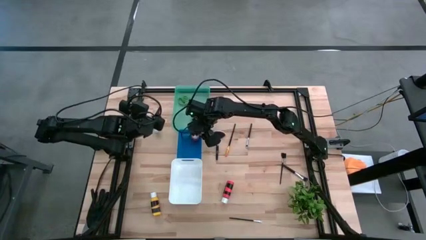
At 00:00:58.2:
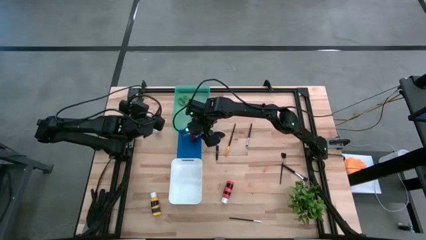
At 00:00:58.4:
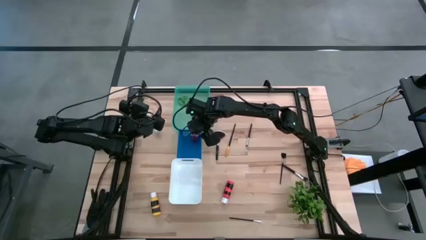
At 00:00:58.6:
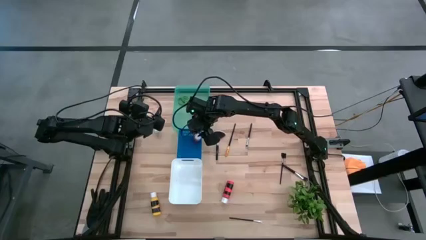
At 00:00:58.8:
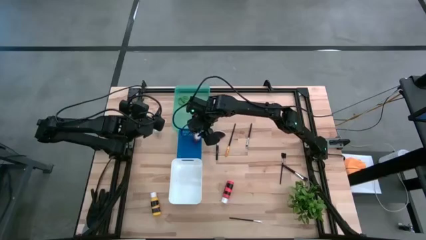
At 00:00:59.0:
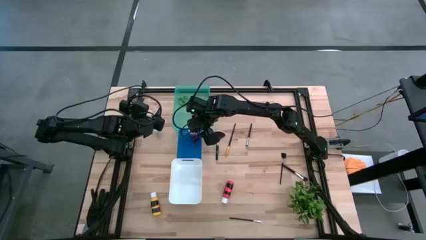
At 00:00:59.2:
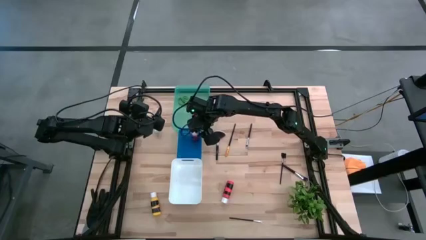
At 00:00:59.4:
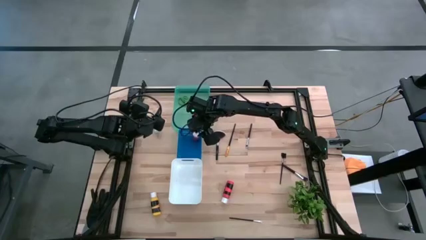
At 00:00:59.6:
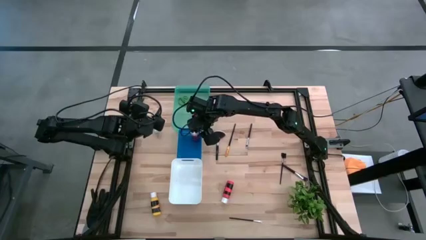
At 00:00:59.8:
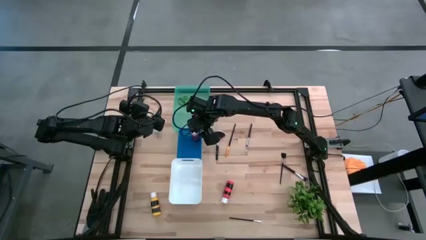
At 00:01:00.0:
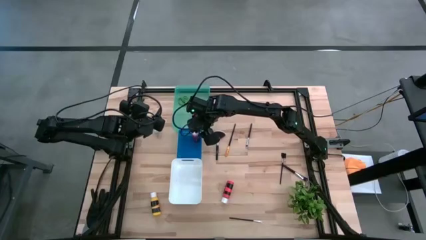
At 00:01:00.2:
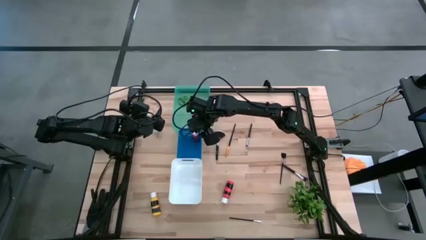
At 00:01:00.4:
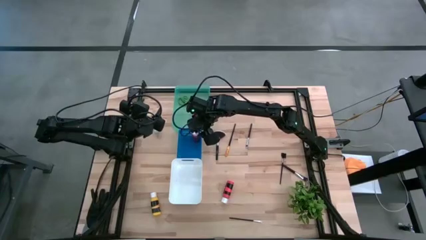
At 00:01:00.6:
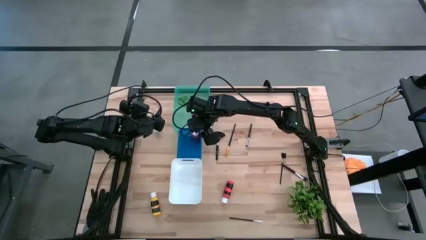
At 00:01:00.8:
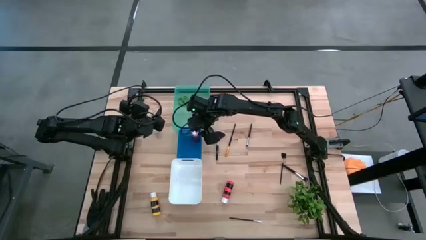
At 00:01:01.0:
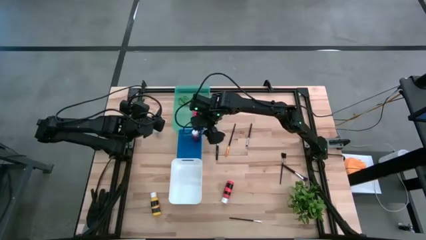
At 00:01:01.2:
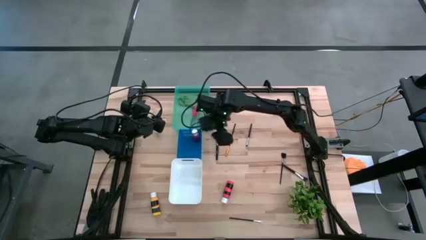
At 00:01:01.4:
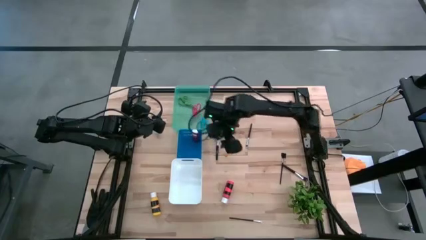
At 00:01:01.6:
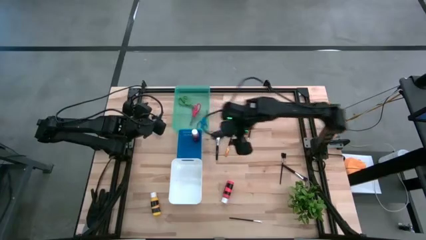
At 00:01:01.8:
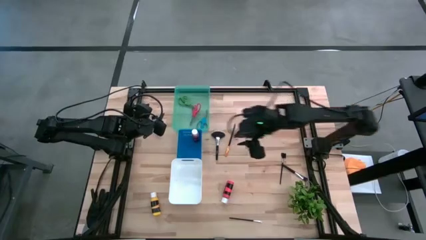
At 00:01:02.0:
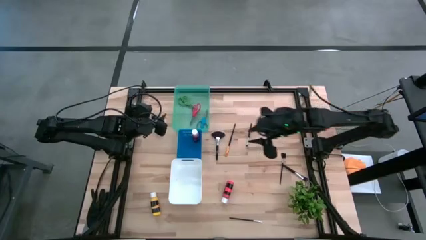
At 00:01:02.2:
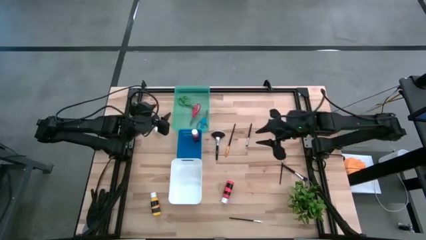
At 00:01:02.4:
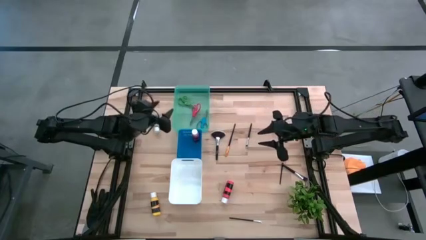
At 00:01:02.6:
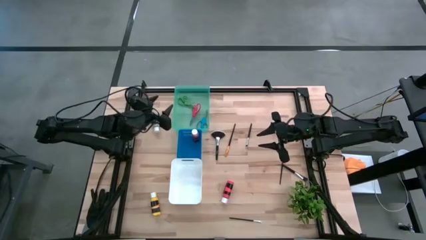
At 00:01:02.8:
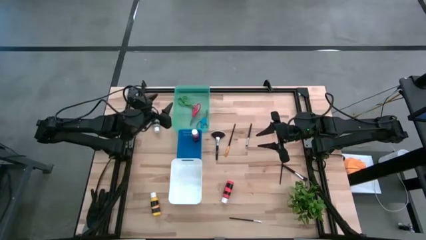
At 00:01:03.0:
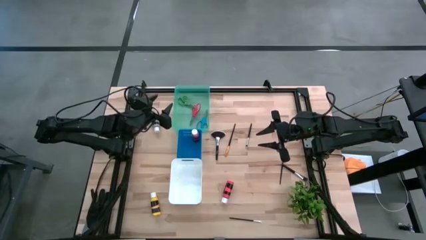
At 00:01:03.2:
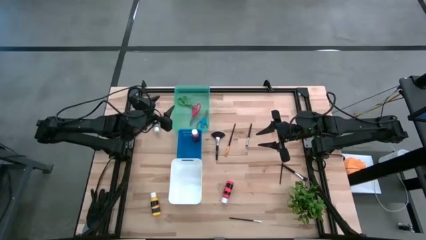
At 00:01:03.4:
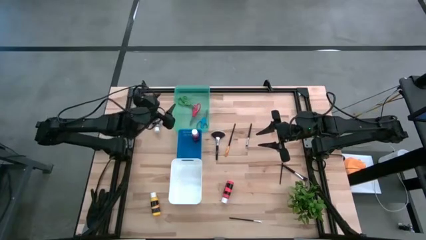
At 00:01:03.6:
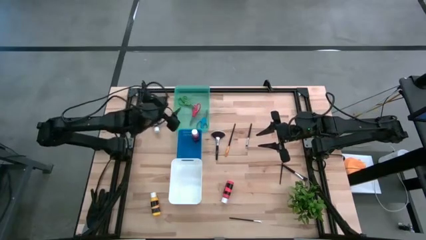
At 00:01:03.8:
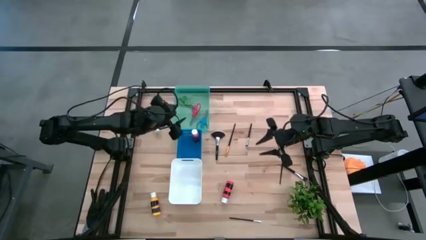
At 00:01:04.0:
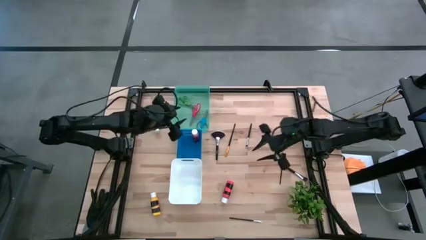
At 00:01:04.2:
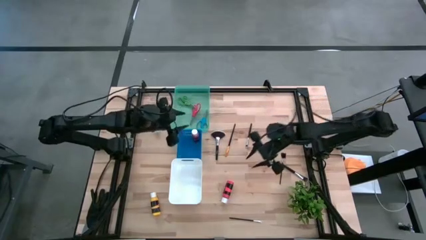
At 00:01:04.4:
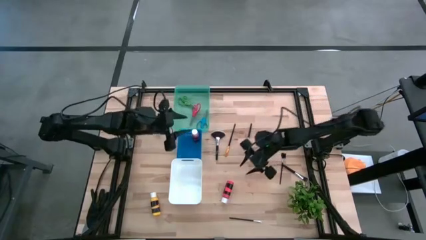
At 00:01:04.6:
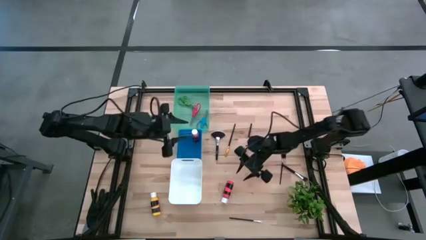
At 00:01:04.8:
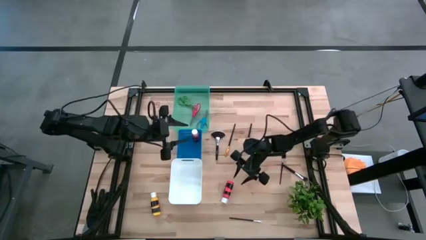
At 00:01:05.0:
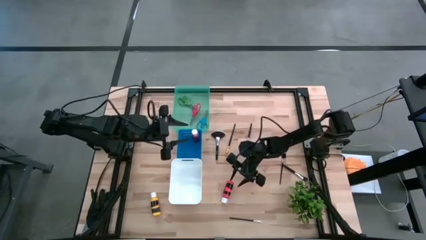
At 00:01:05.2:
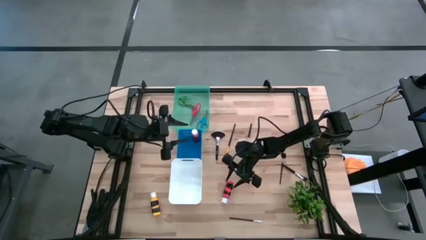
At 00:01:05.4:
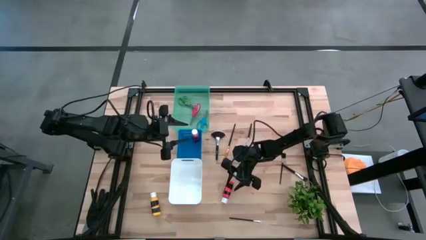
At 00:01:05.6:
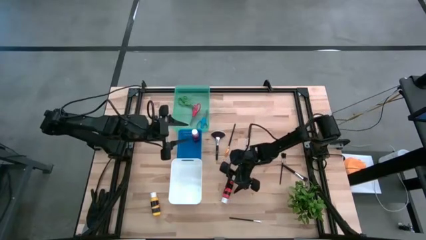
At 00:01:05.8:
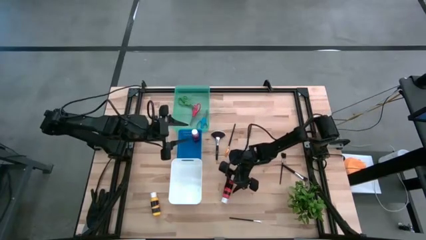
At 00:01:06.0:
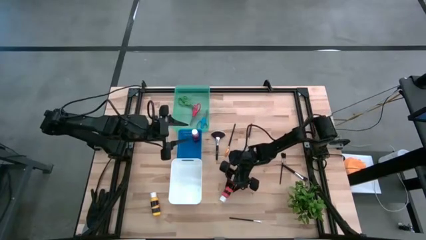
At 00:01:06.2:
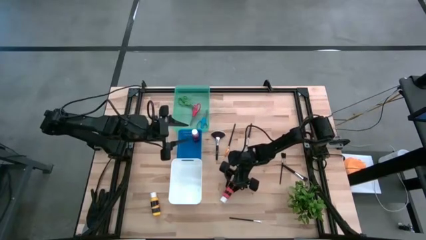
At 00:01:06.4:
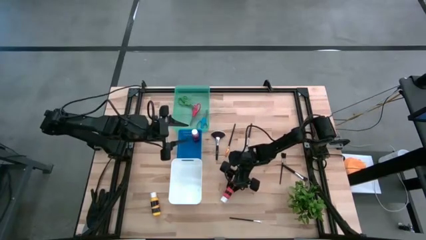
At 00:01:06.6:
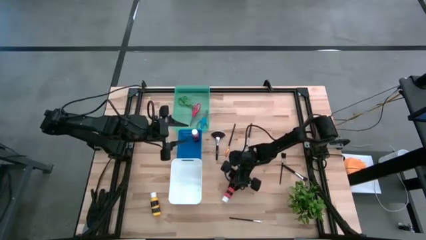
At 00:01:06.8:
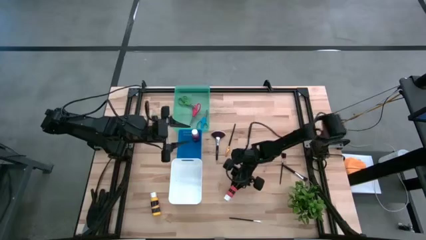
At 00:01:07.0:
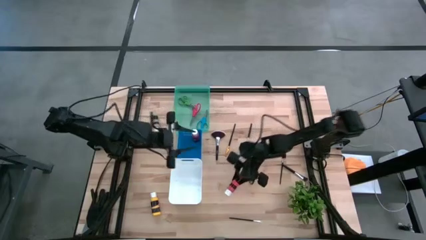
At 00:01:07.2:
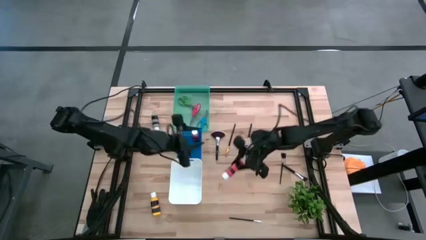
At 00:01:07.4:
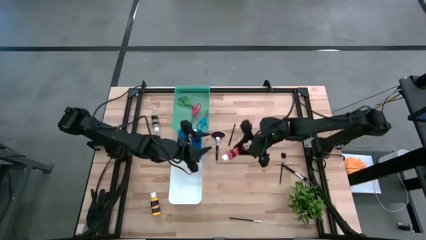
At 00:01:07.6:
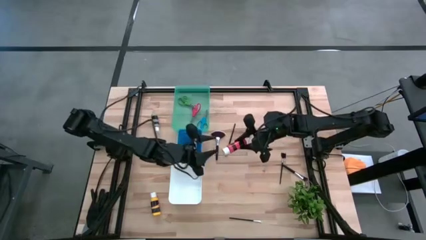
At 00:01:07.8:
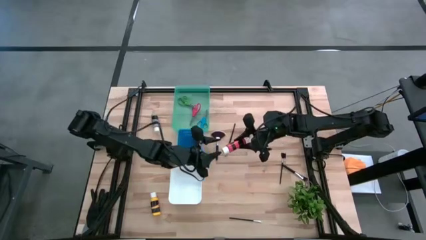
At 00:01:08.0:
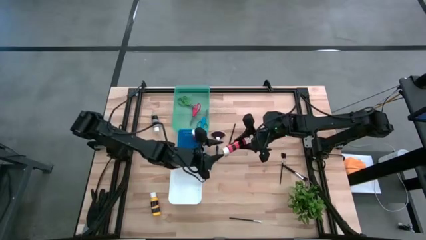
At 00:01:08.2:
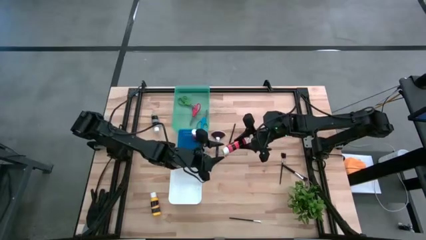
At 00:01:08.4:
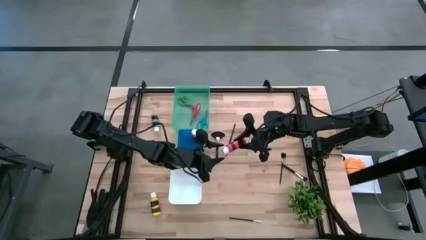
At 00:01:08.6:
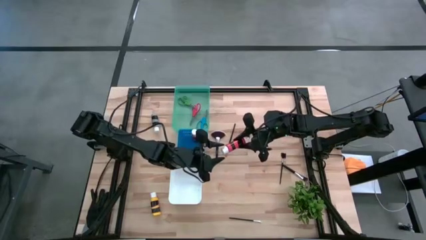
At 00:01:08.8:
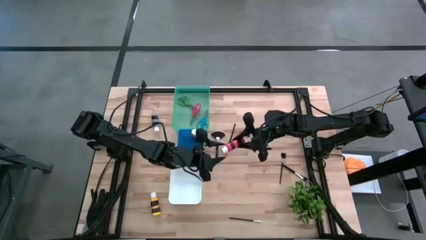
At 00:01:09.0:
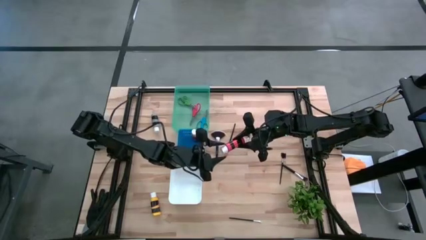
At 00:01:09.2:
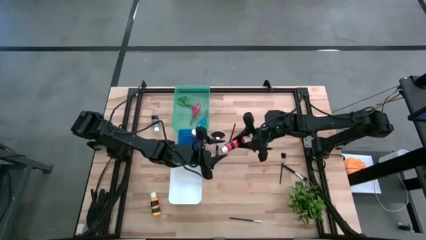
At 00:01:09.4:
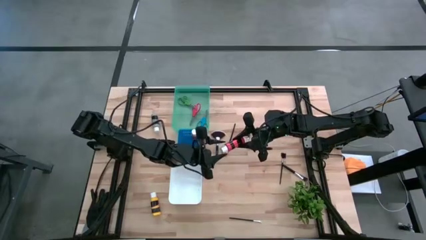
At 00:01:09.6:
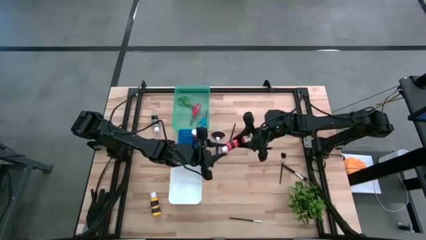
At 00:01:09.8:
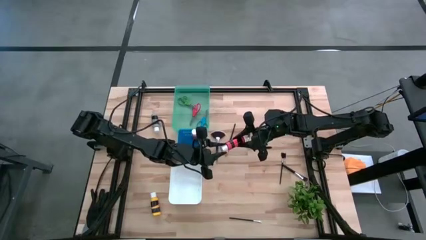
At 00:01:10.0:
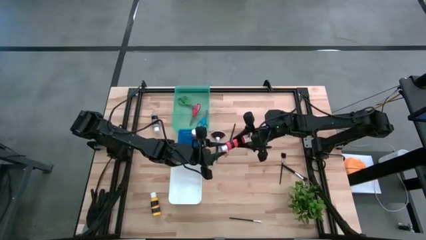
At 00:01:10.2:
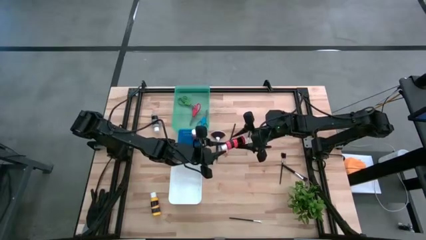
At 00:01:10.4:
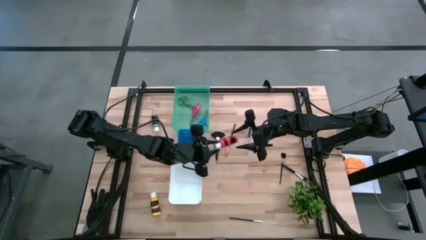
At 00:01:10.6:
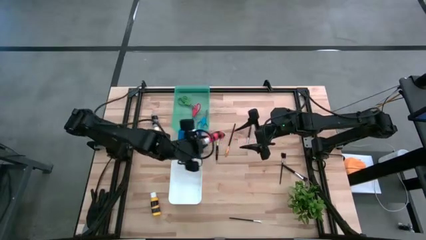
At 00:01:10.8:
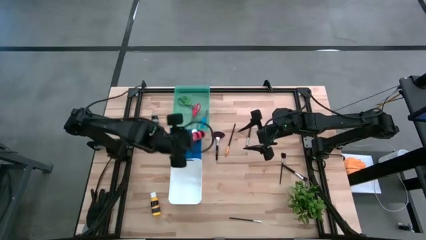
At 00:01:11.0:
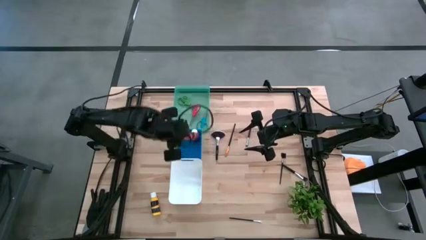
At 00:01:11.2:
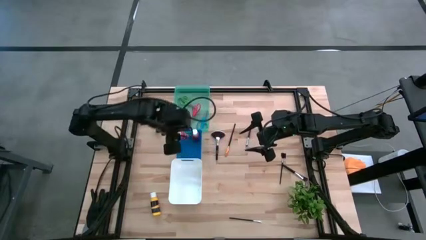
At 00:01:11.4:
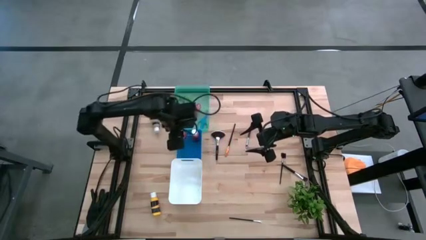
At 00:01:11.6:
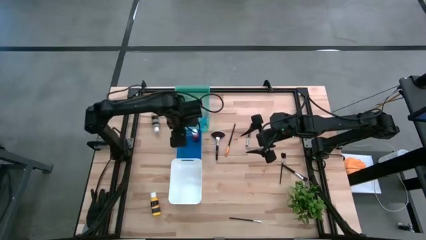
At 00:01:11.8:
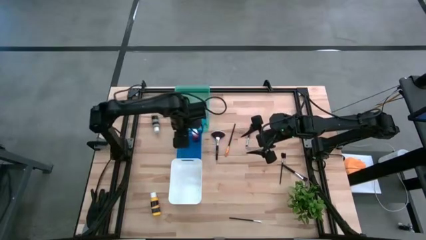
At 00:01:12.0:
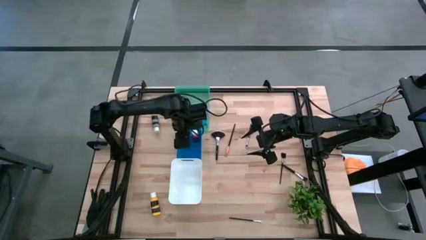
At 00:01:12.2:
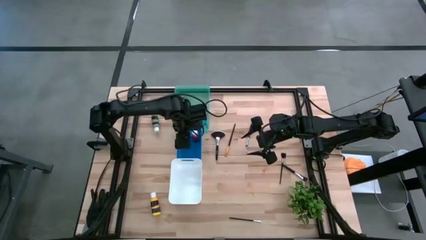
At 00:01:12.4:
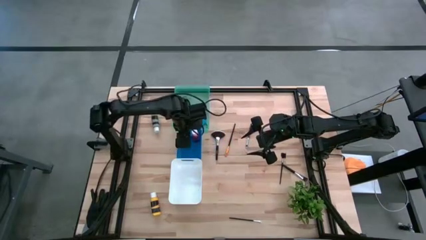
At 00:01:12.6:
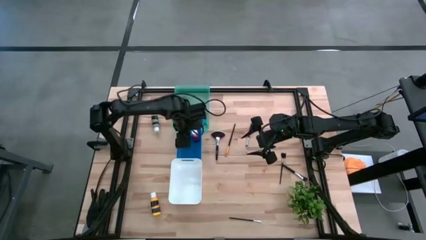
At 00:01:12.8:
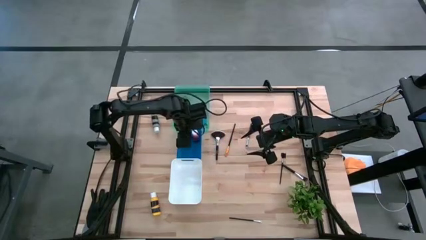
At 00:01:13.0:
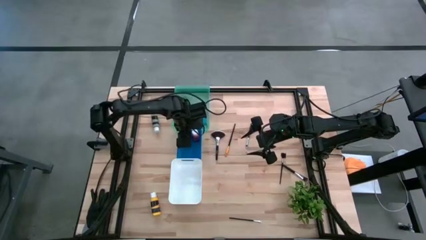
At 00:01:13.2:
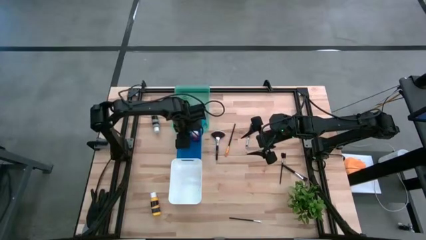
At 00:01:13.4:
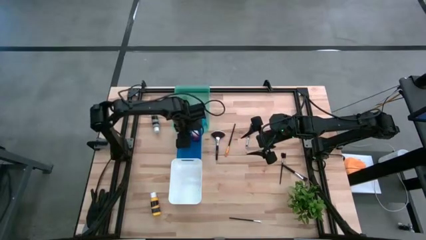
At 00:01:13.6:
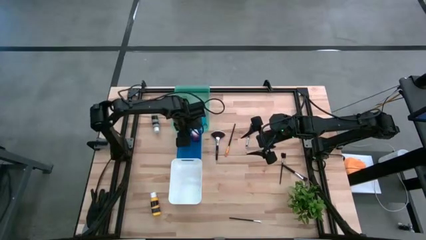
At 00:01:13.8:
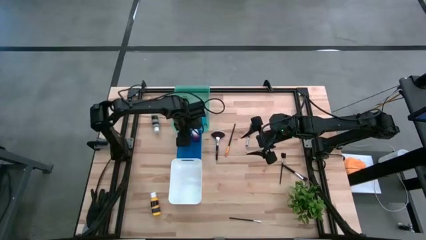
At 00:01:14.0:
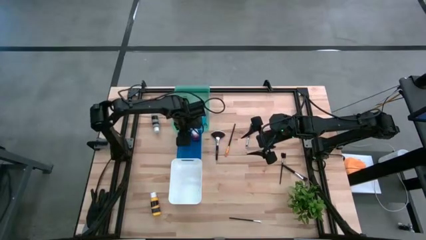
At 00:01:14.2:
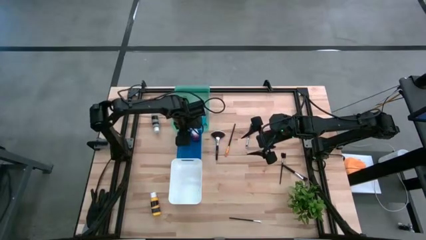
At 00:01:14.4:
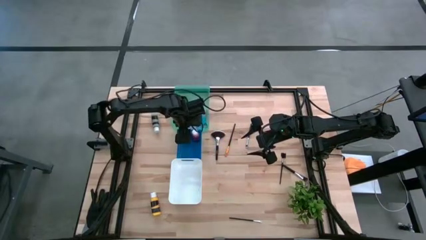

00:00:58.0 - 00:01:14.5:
Task: Pick & Place Paint Supplies
Put the orange paint bottle into the blue bin
